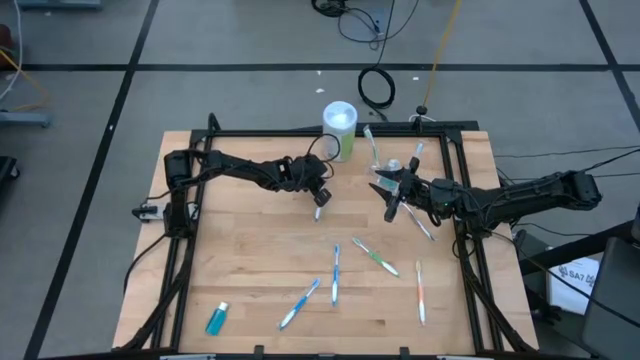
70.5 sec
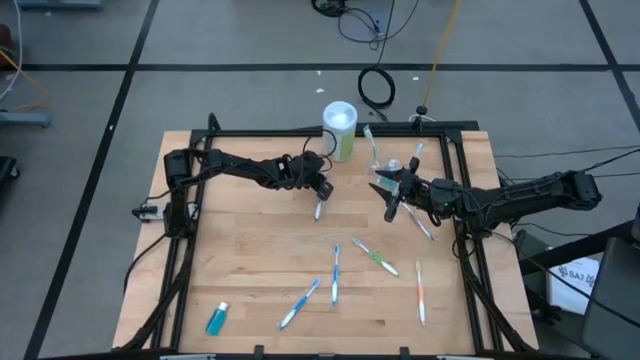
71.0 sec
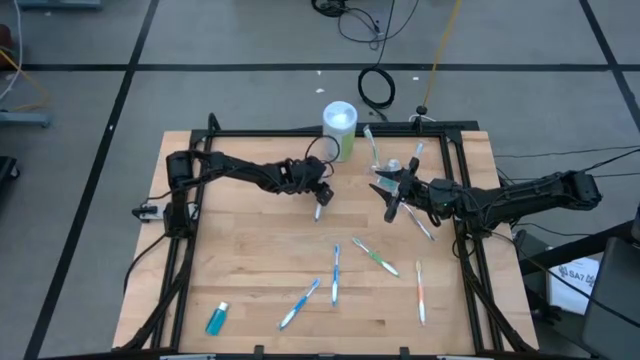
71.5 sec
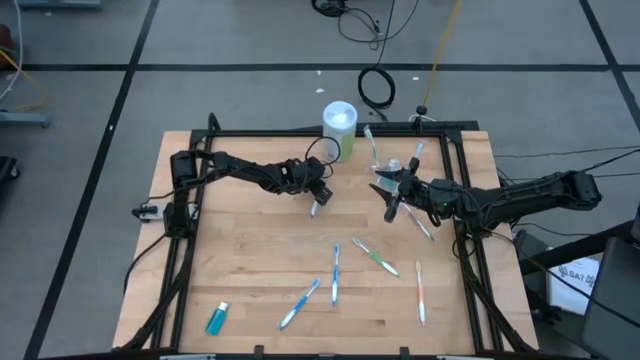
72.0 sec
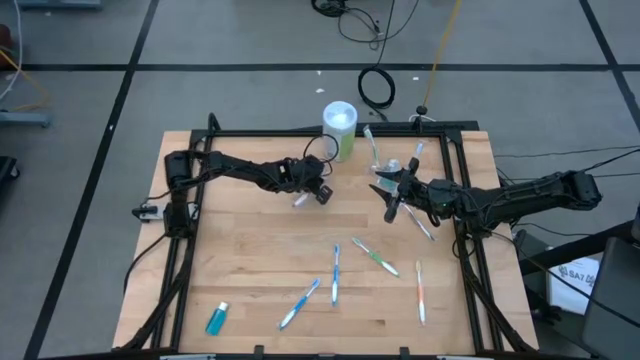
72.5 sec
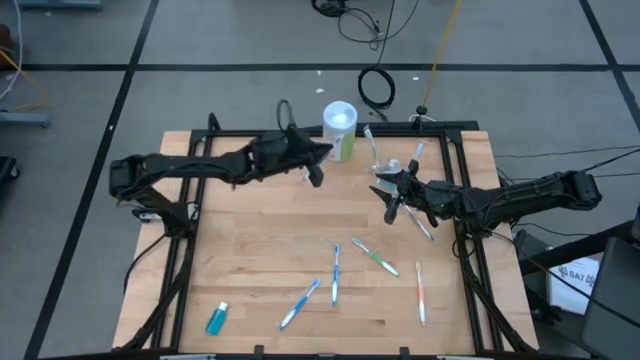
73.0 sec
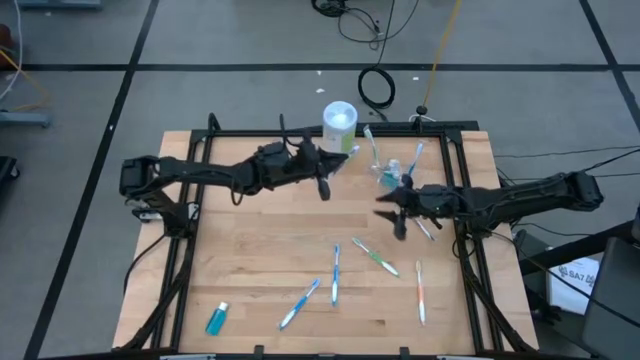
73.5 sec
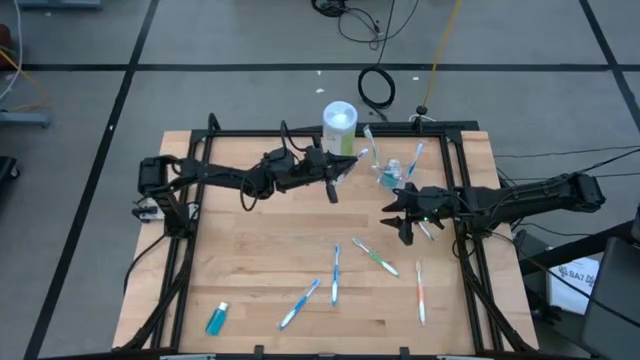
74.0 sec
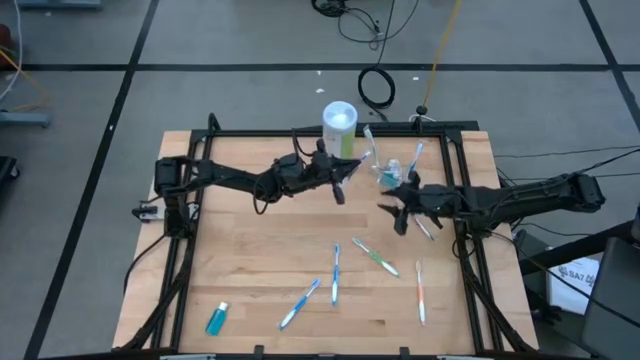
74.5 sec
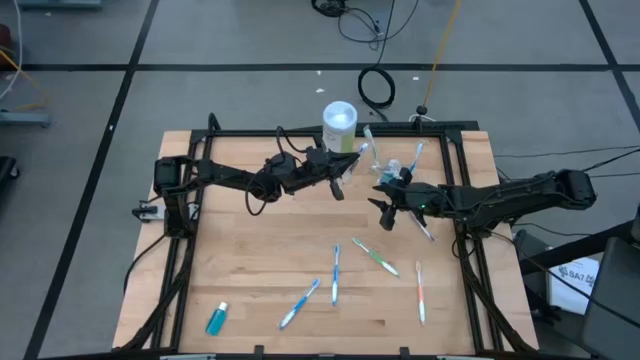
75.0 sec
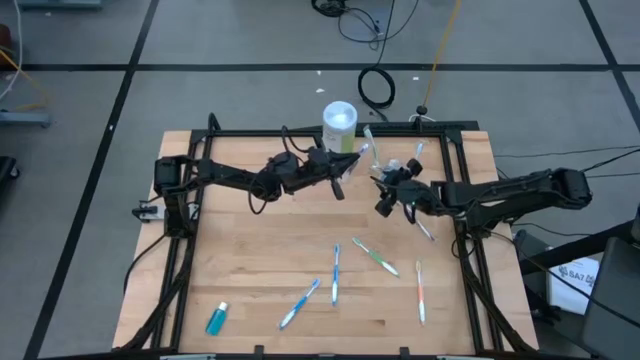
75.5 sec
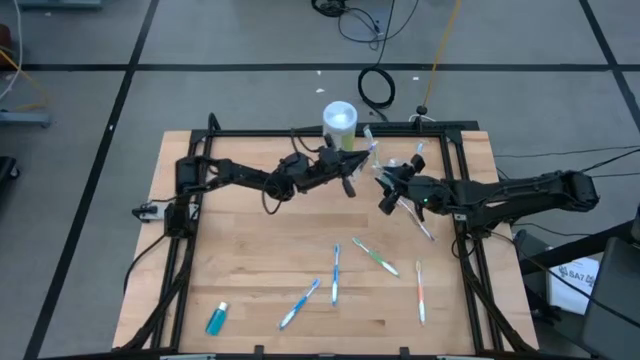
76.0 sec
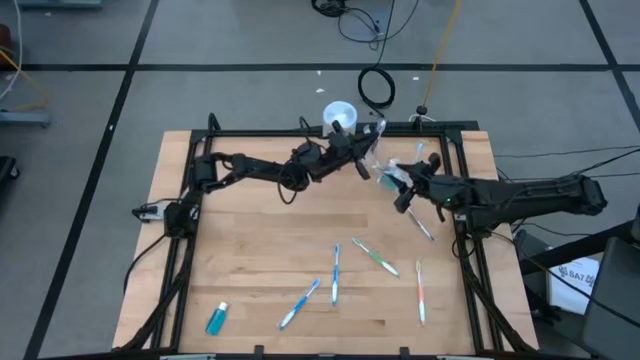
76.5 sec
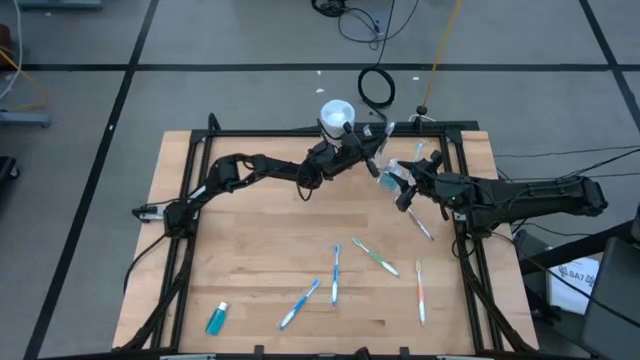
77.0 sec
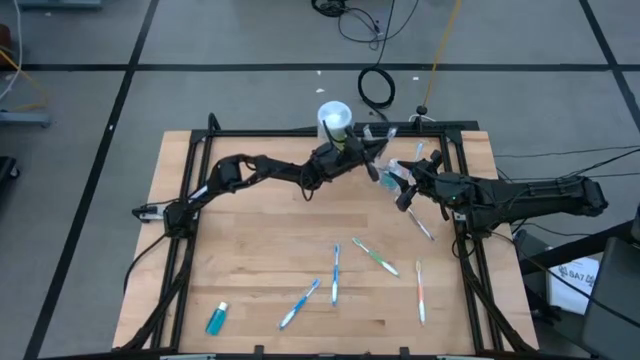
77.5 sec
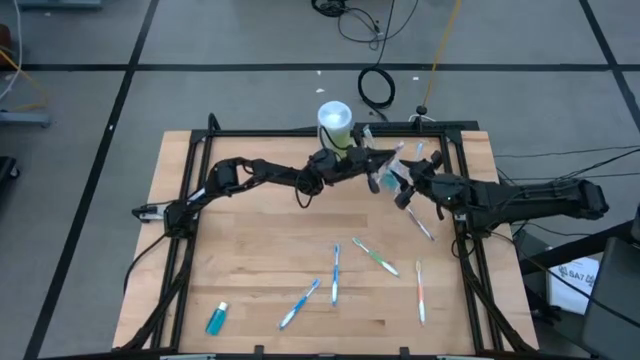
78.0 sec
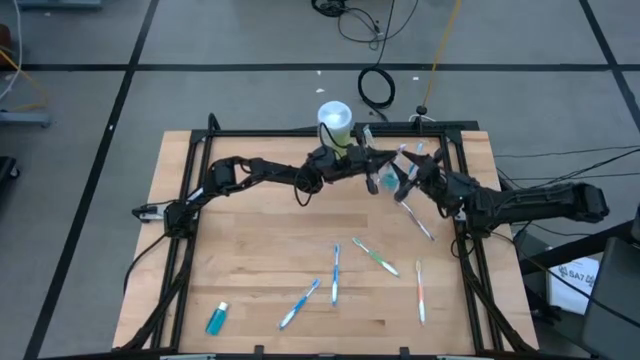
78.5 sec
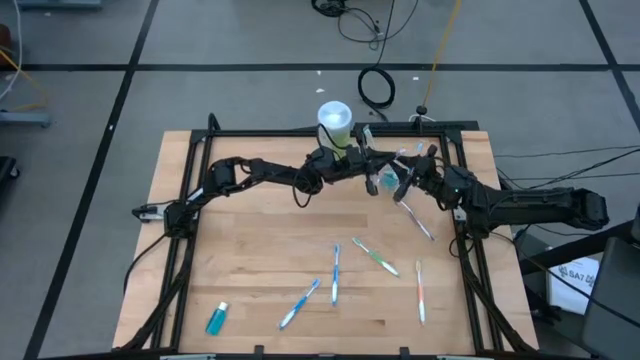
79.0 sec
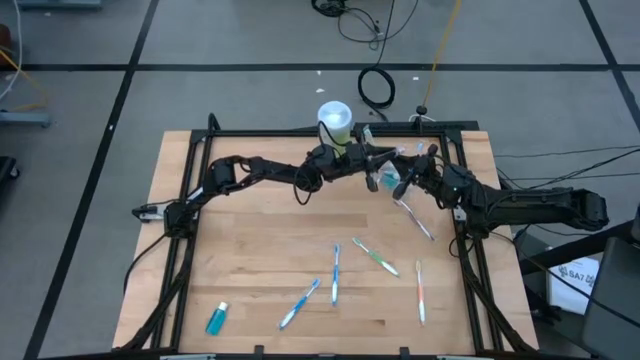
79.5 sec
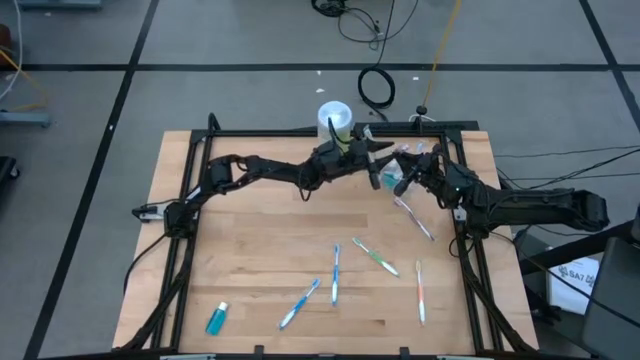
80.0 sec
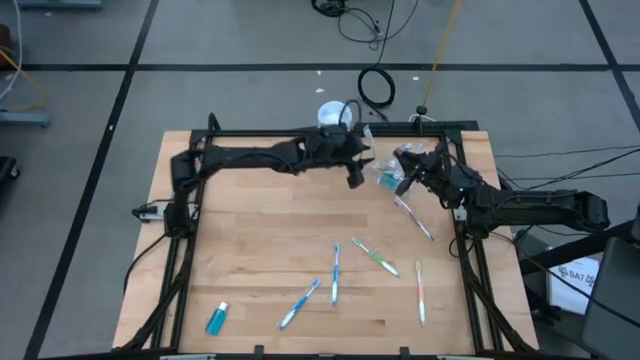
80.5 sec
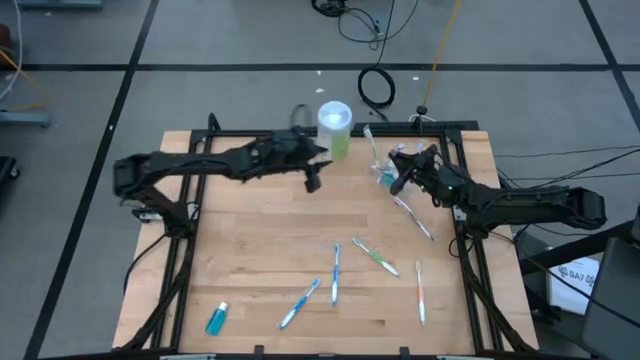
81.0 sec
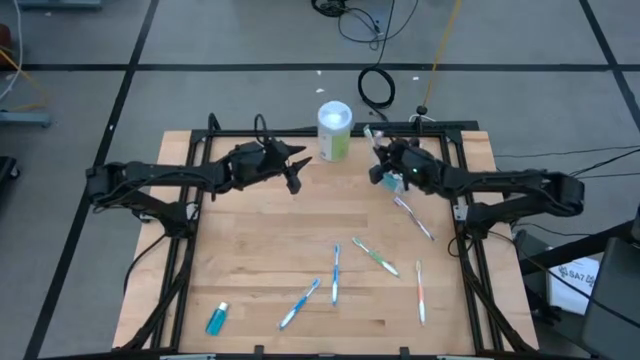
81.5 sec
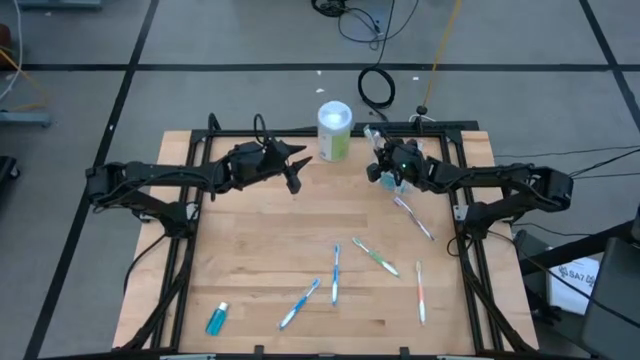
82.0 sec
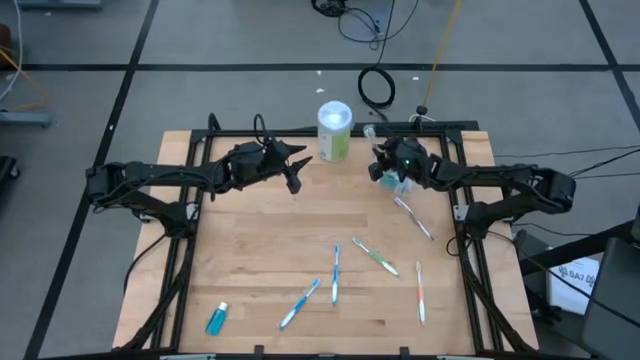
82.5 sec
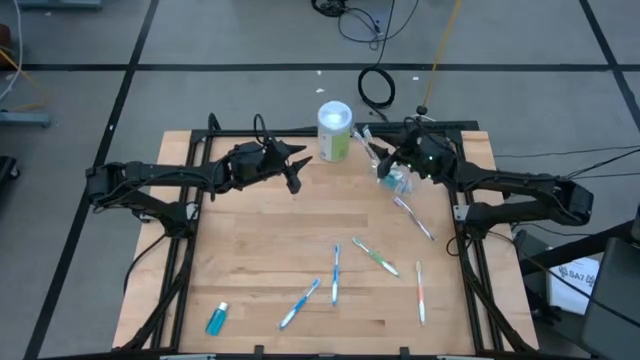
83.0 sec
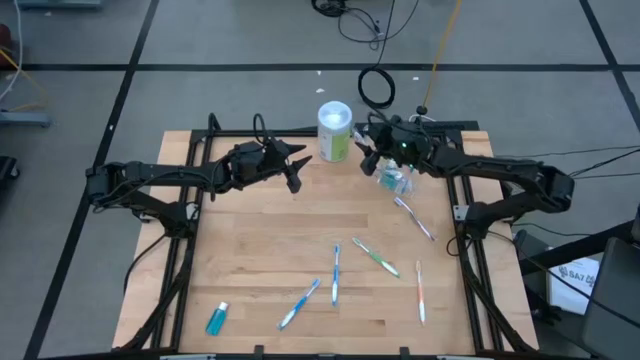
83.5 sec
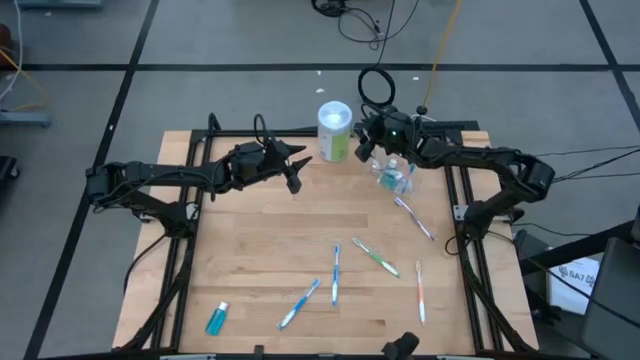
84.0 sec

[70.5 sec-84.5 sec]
Task: Pick & Place toothbrushing station
Put the left purple toothbrush into the transparent organizer

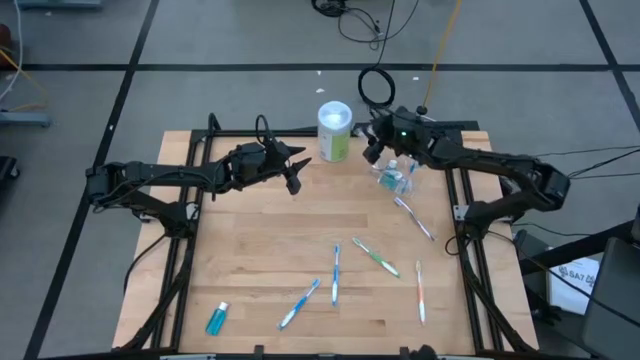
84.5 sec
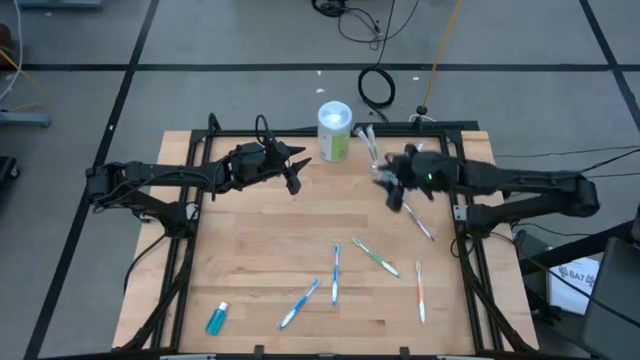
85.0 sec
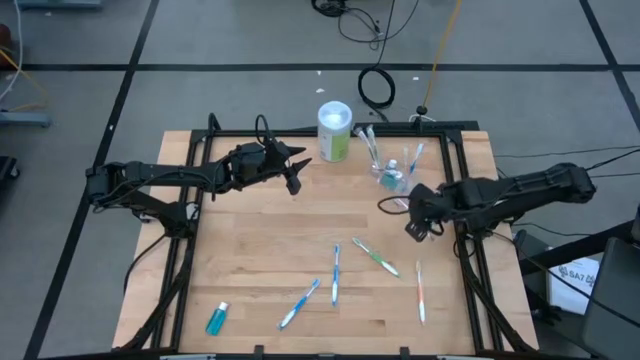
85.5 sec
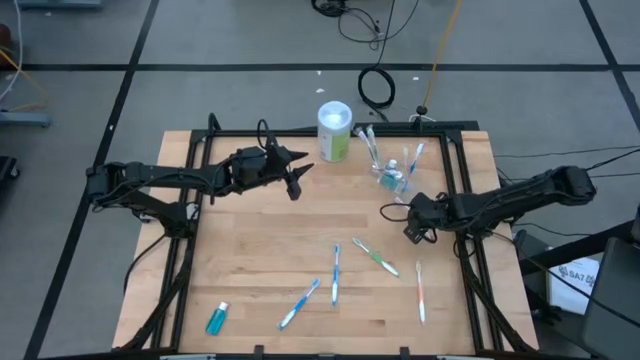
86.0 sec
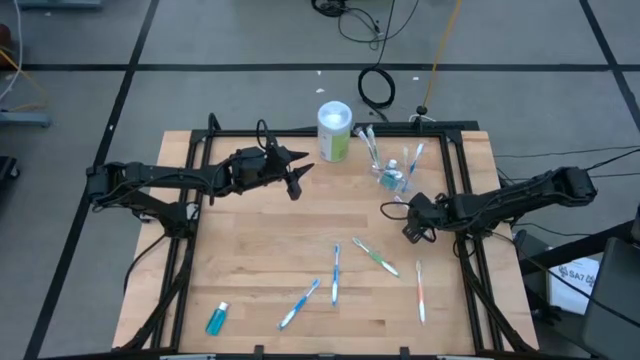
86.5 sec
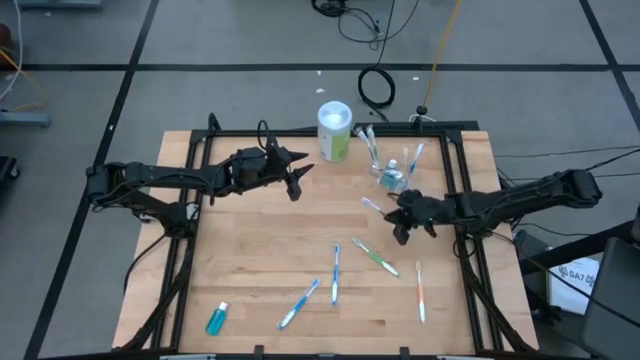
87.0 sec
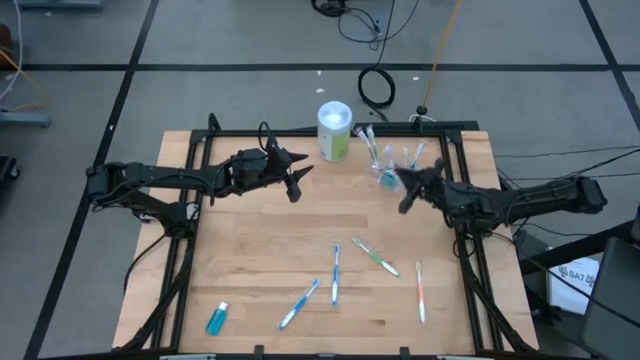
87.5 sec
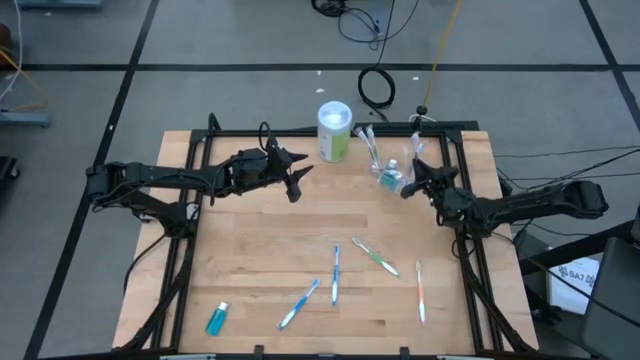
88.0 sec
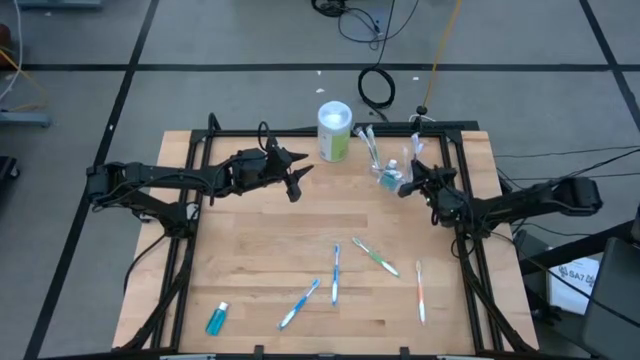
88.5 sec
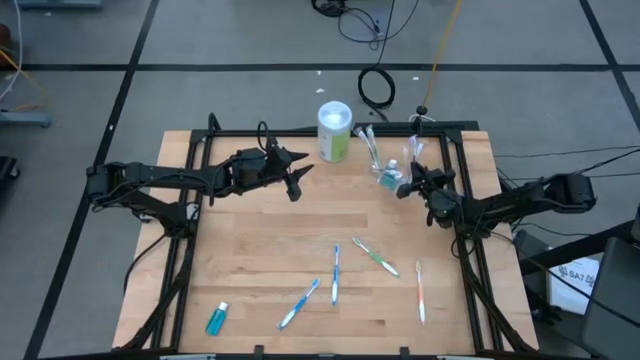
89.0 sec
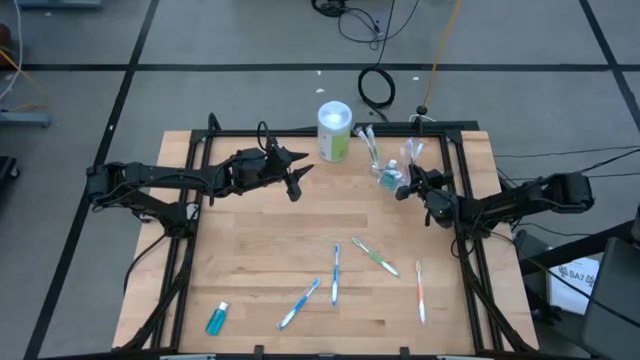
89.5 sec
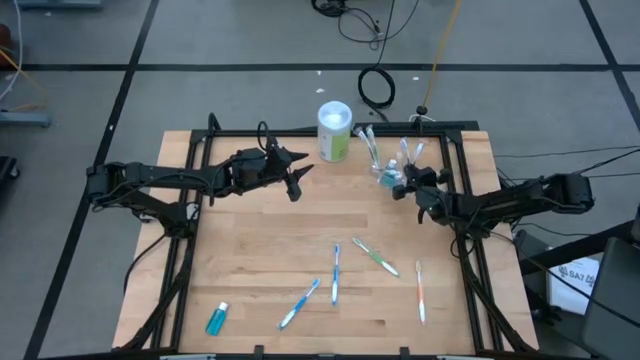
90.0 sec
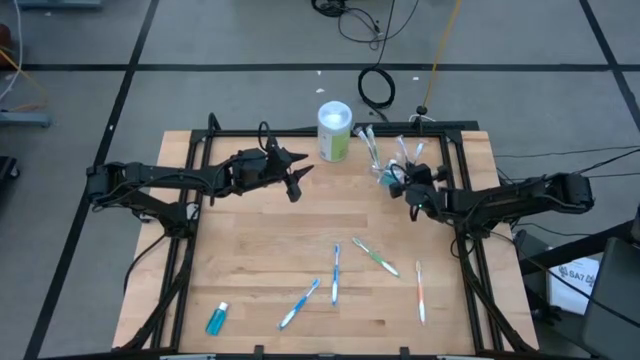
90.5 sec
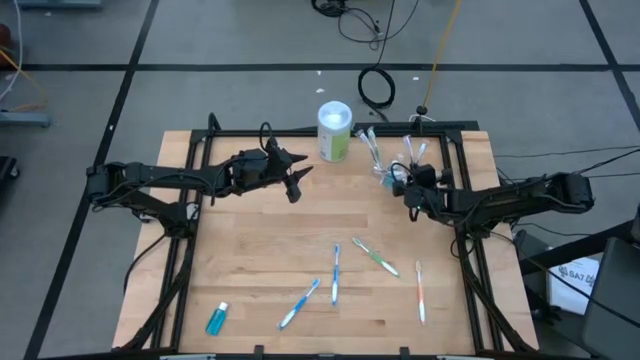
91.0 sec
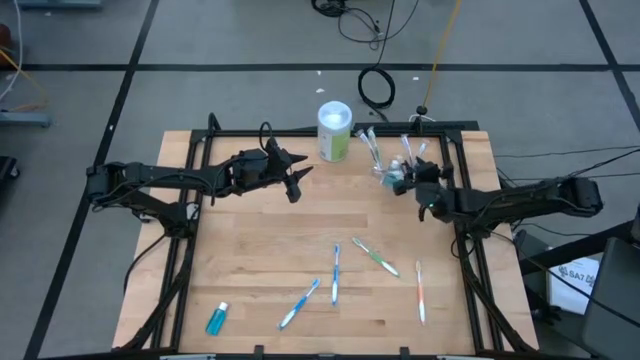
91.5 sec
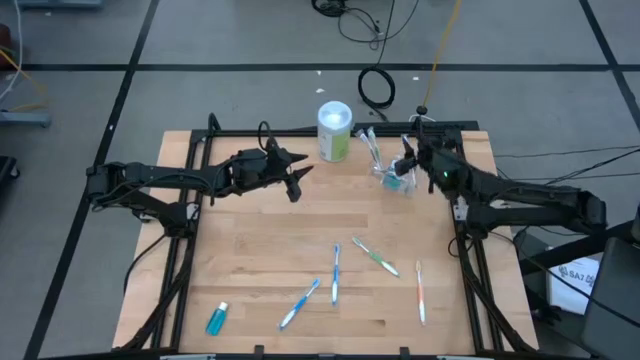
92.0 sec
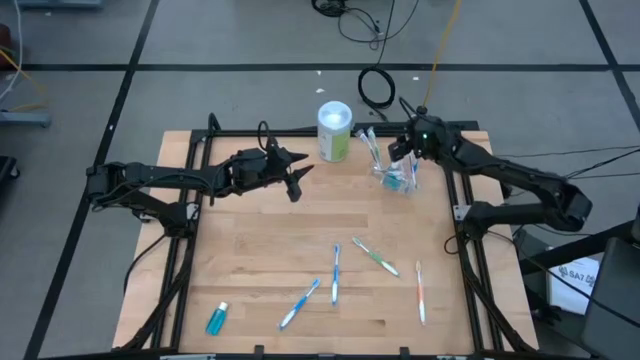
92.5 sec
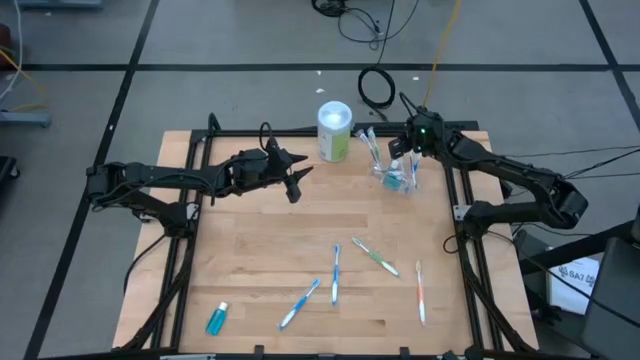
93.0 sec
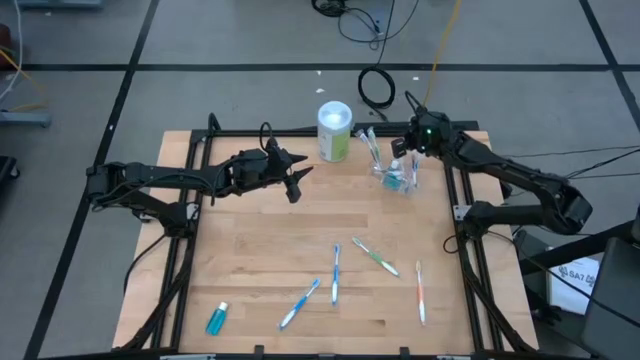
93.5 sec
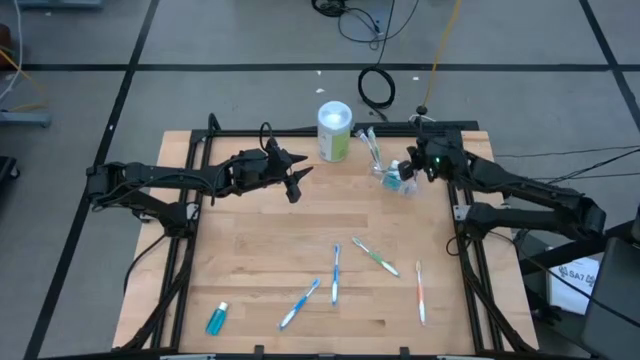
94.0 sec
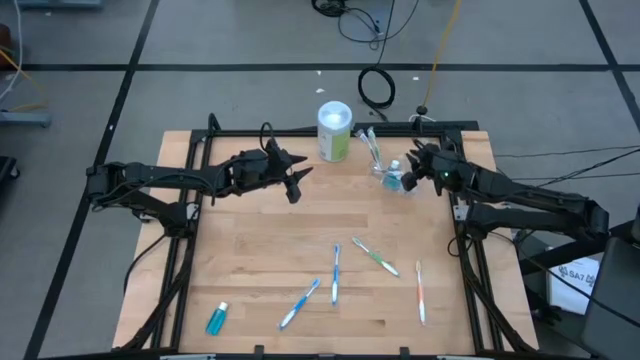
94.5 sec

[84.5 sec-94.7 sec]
Put the purple toothbrush into the transparent organizer
